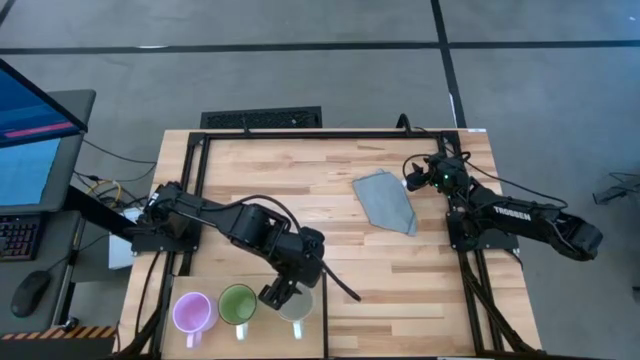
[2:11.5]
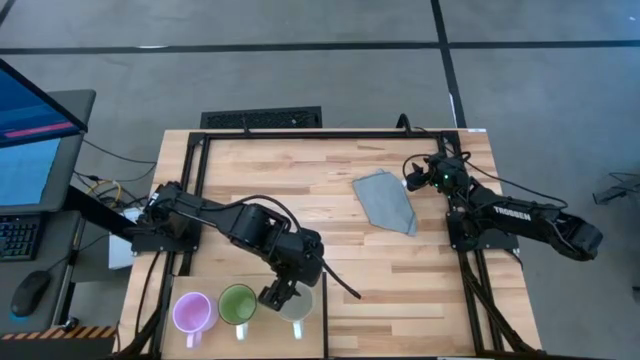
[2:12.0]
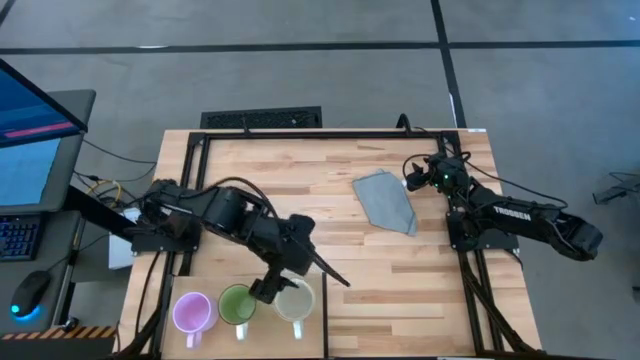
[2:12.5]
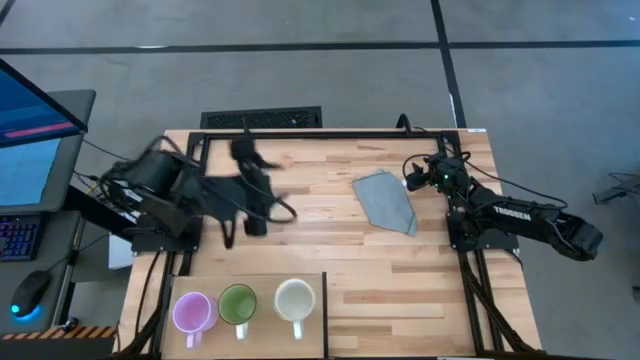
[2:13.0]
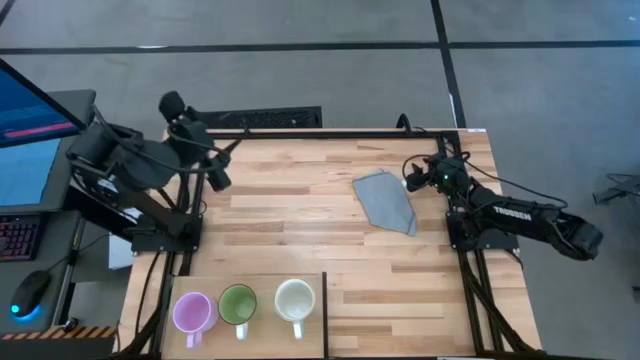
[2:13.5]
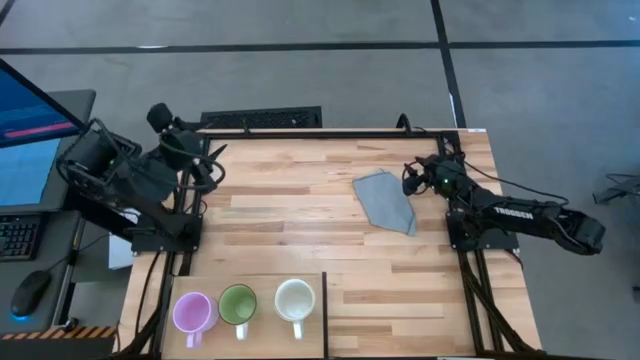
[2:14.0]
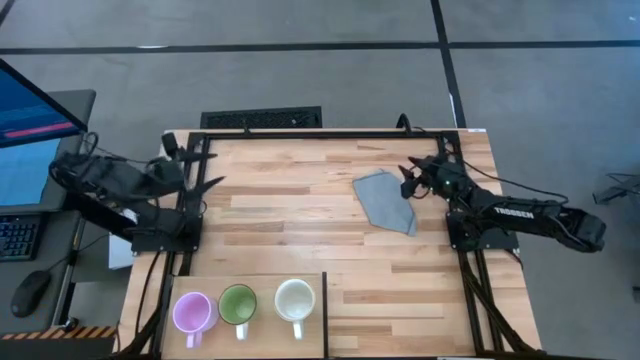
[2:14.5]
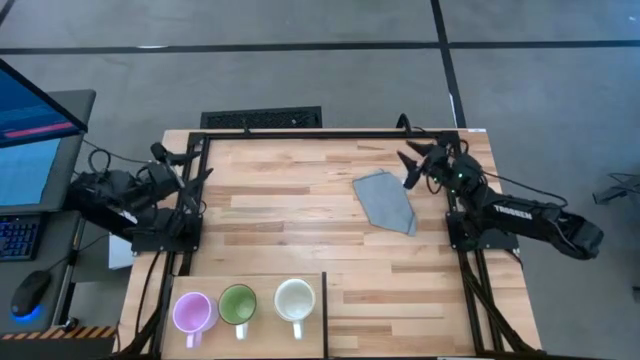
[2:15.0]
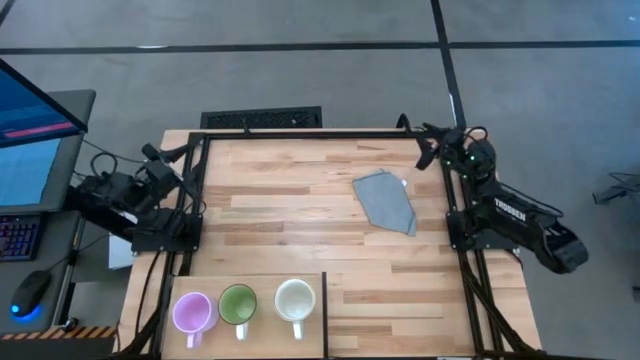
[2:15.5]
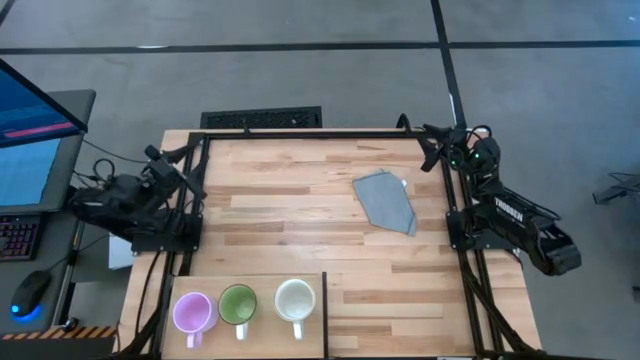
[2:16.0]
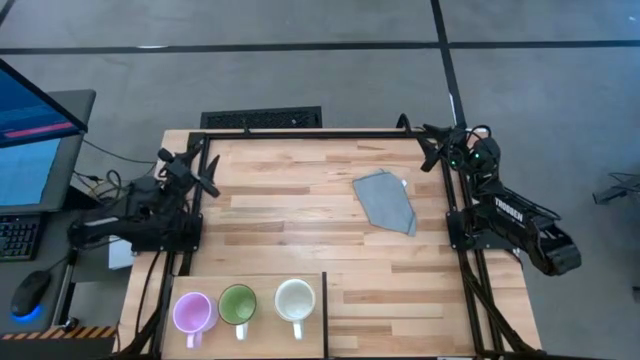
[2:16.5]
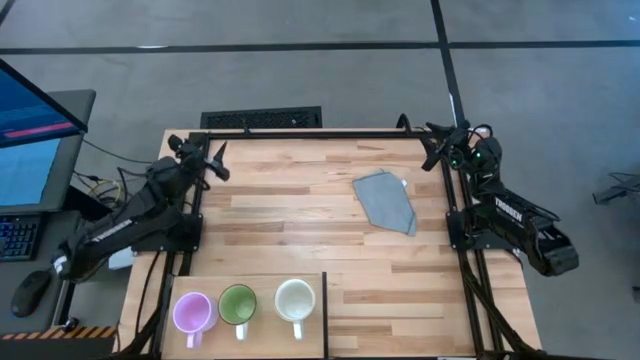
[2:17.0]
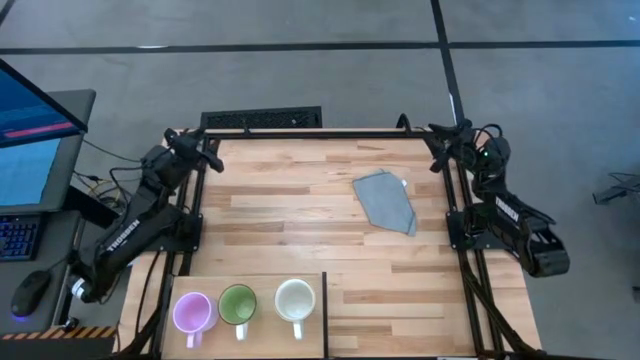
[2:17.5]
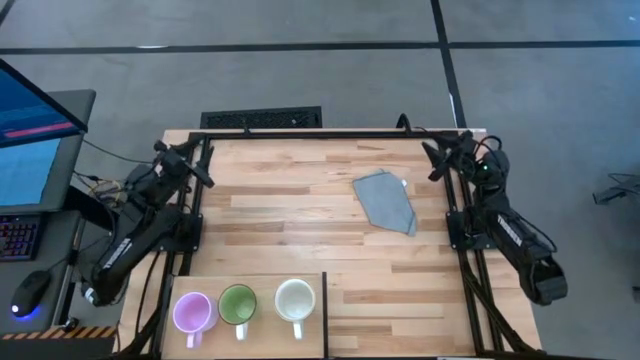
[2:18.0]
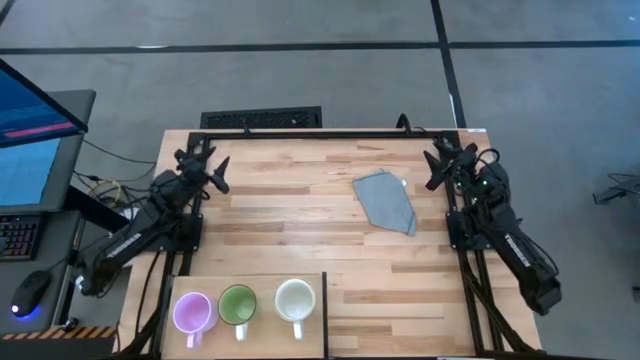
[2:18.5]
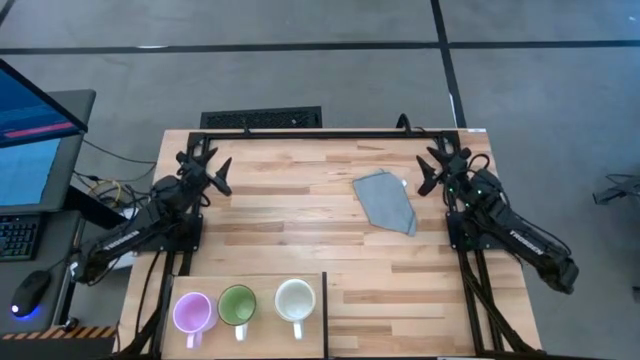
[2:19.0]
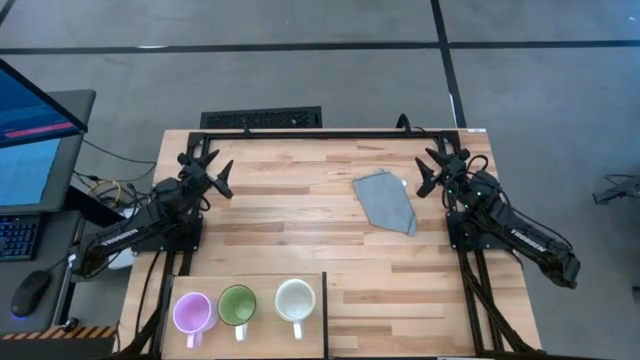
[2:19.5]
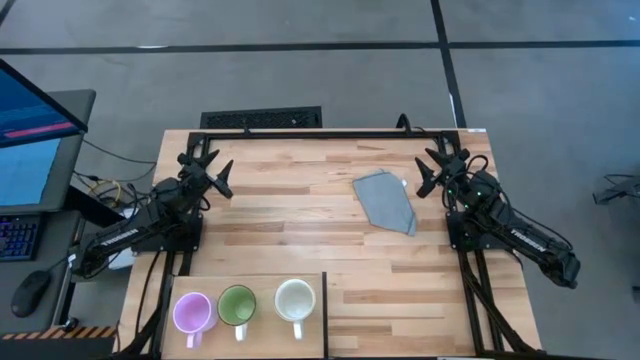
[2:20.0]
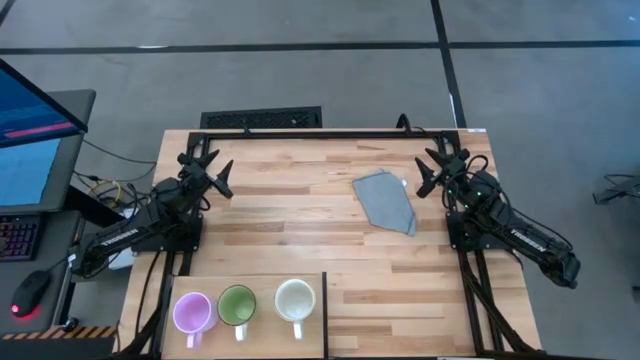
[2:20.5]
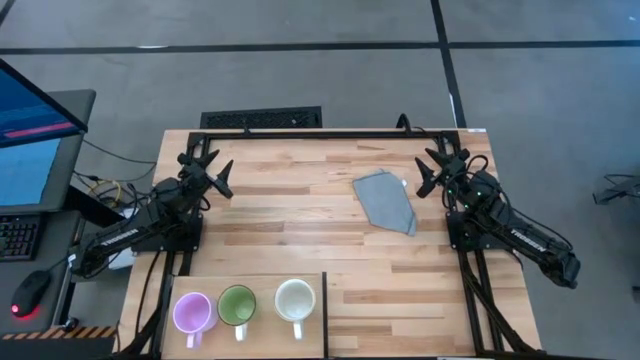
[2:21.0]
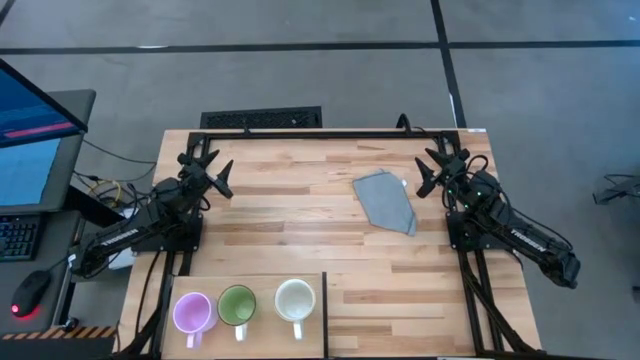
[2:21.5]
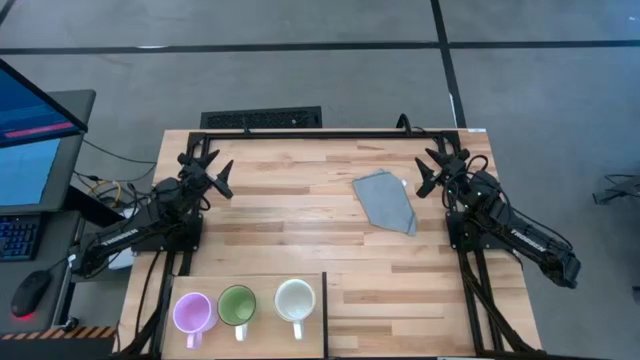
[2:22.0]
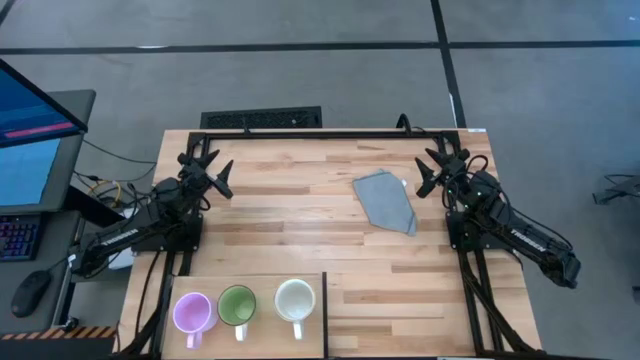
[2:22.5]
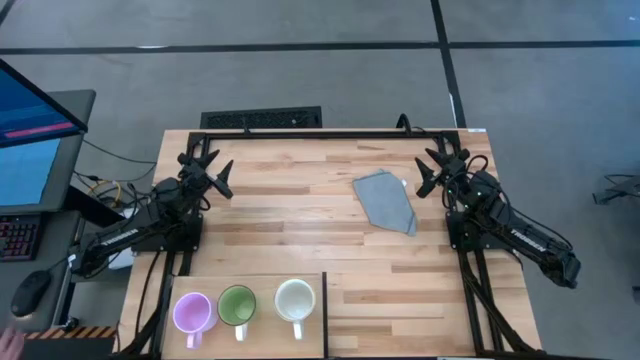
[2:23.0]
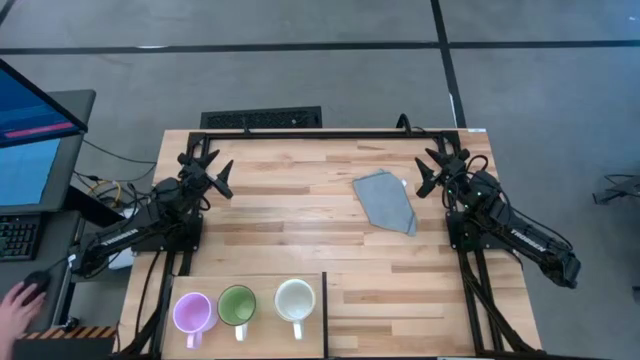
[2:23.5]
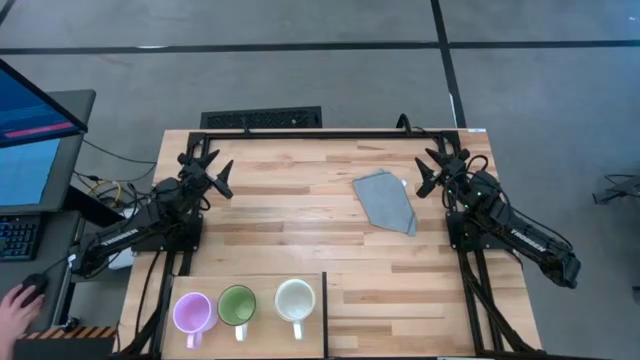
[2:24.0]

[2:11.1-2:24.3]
Task: Stack small to large cups/mugs on shelf
Return to Home position

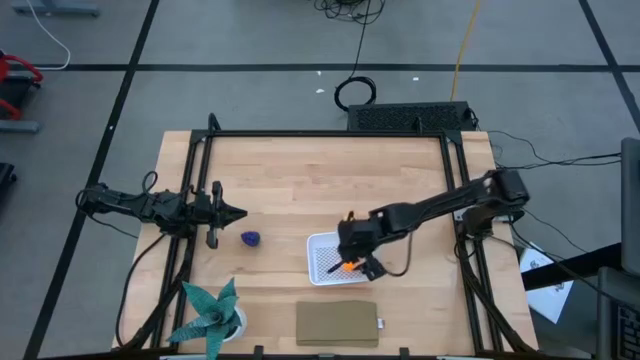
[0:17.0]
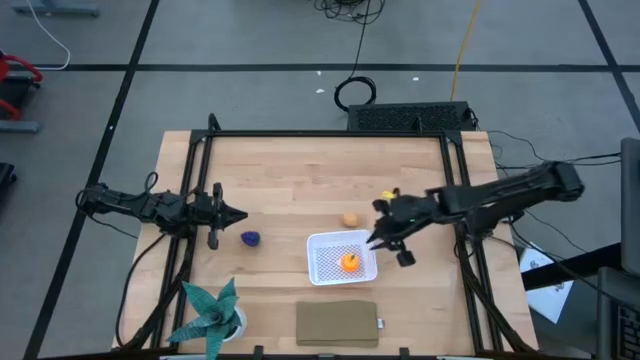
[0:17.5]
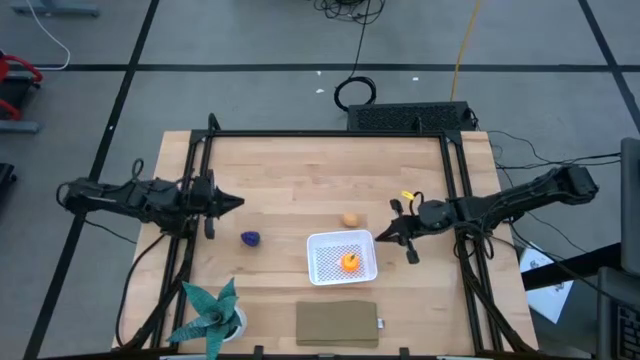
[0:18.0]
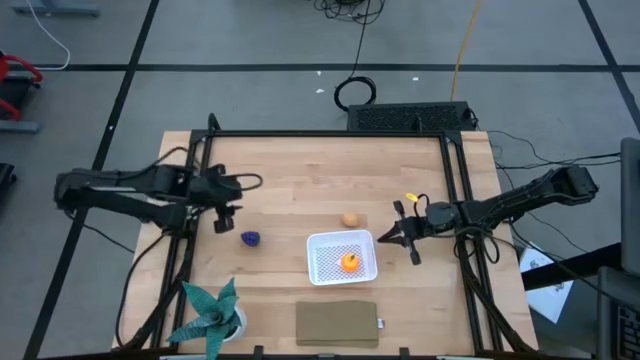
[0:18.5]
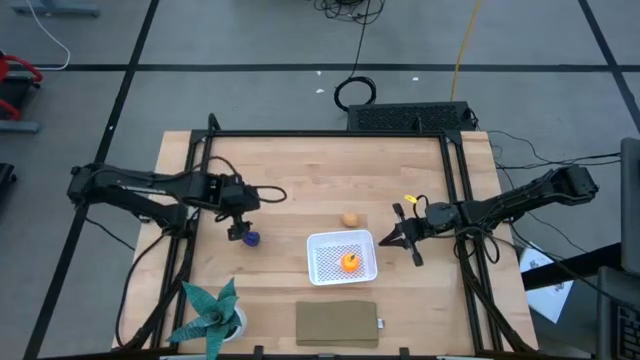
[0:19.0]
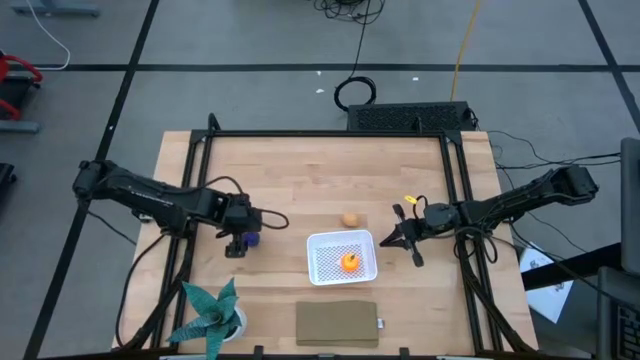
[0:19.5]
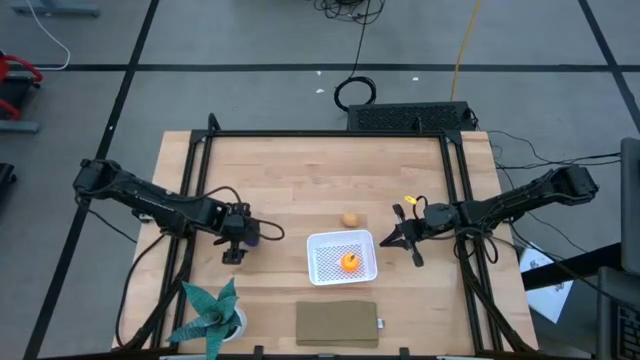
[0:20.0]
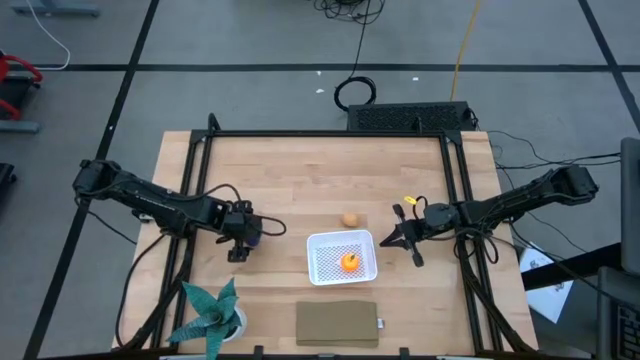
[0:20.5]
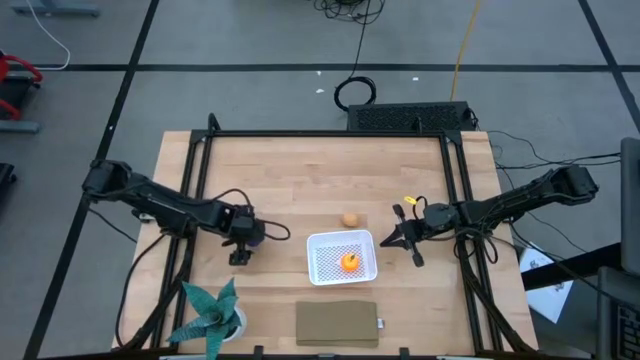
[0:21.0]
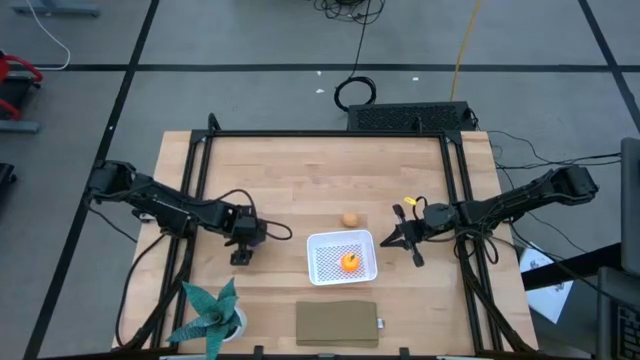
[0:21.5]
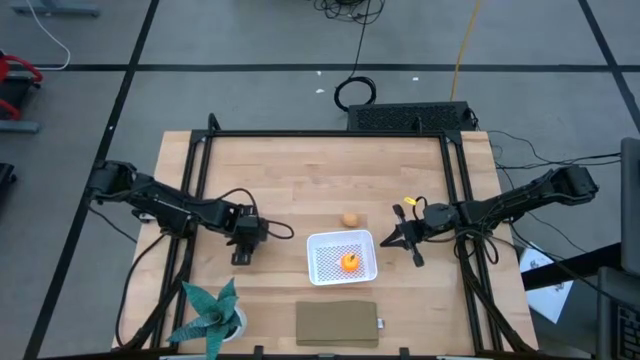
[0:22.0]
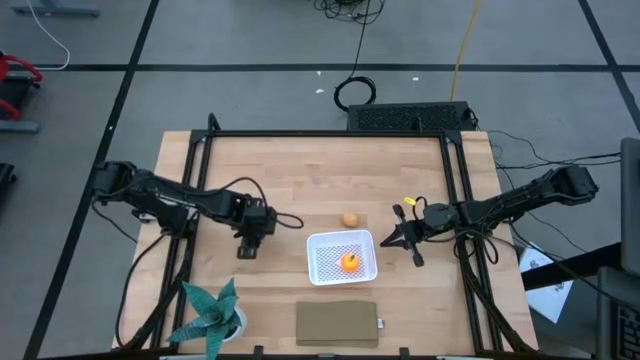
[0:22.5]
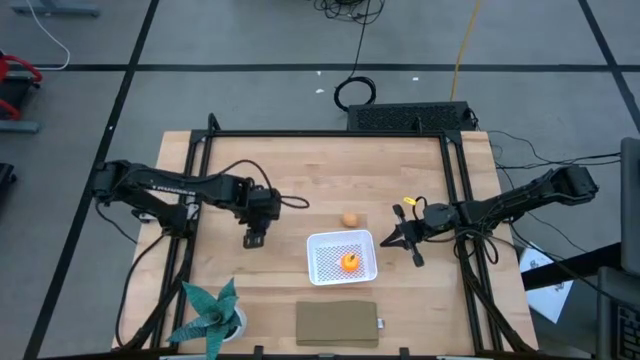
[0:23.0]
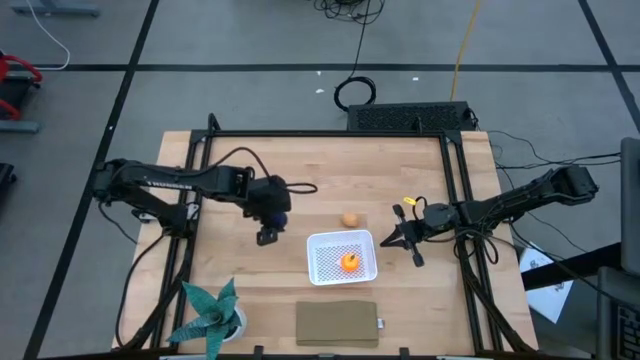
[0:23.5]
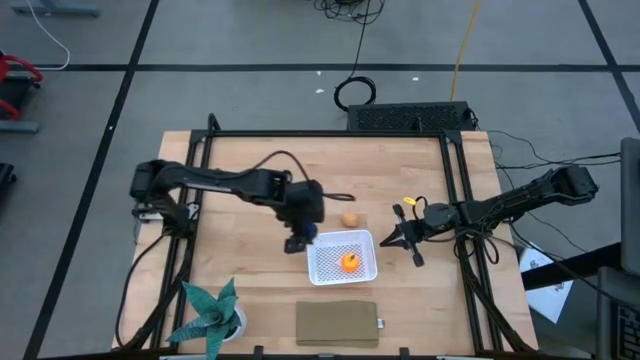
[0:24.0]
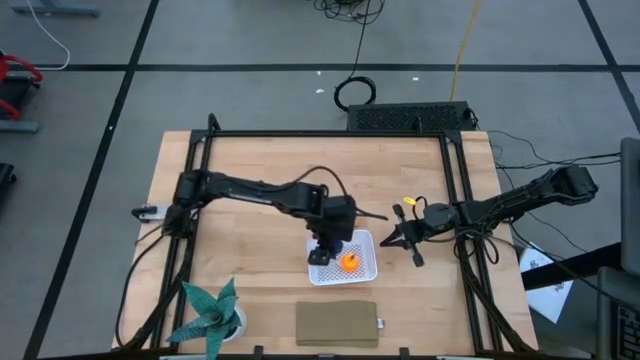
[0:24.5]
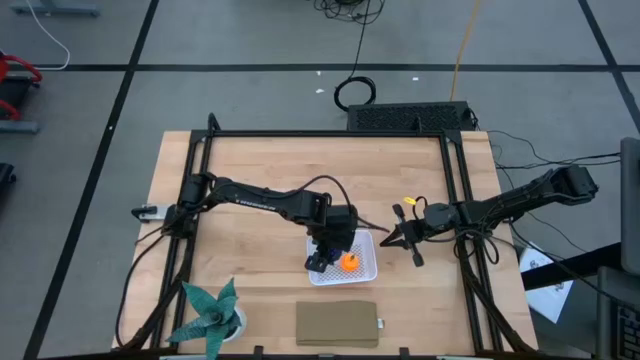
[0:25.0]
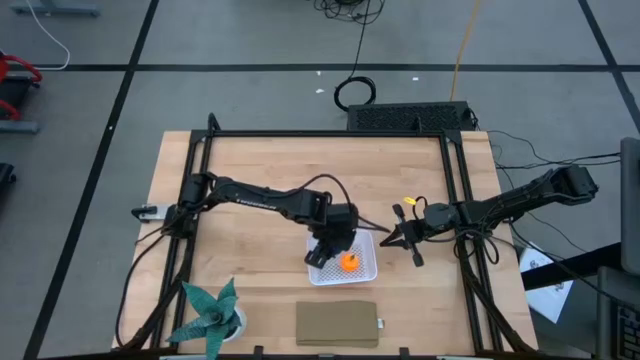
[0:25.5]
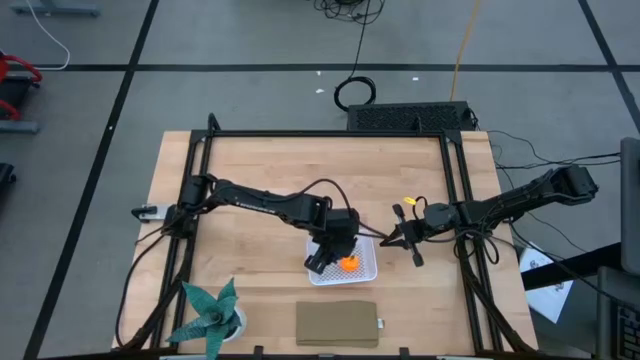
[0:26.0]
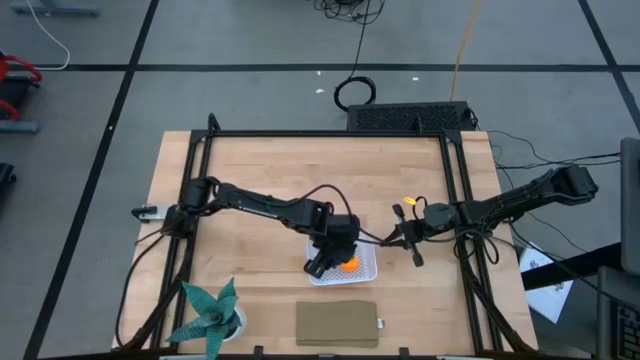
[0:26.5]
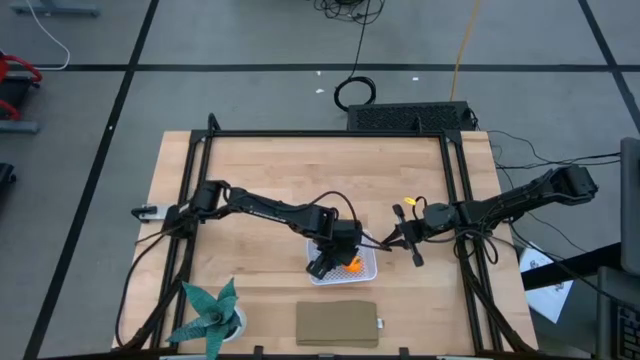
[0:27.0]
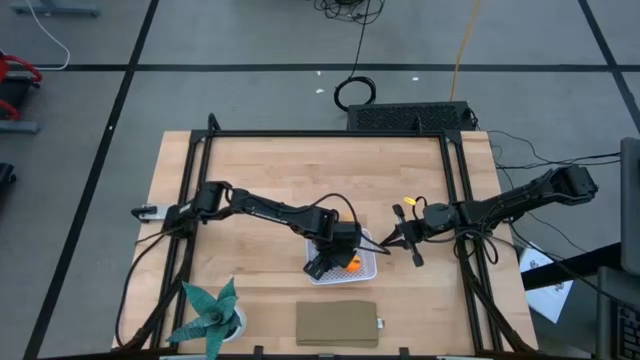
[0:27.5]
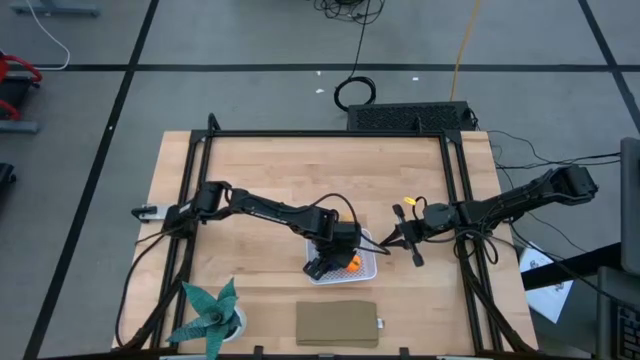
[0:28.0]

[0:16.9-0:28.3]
Task: Pick and placing Produce into tupperware
Put the grape into the white basket
